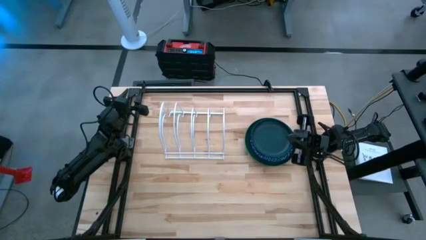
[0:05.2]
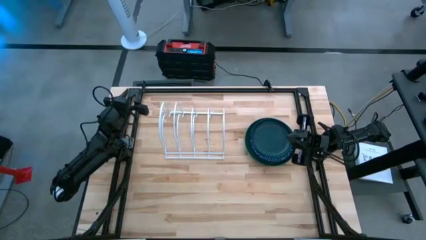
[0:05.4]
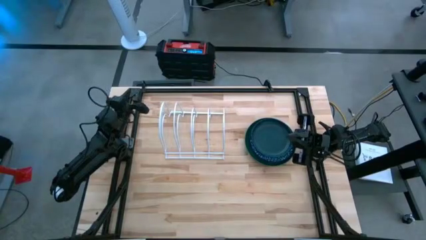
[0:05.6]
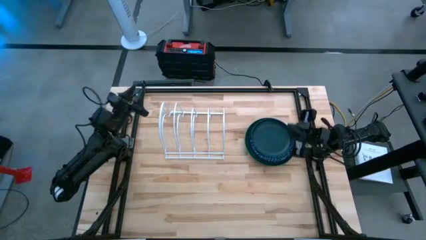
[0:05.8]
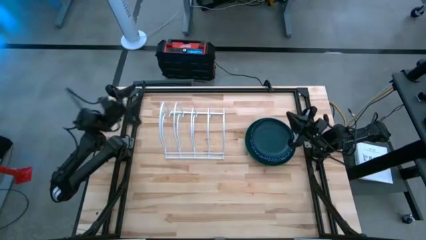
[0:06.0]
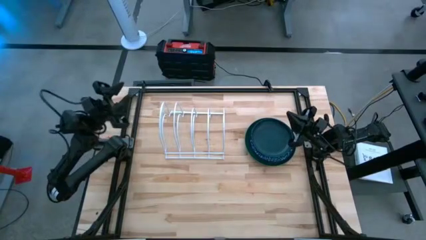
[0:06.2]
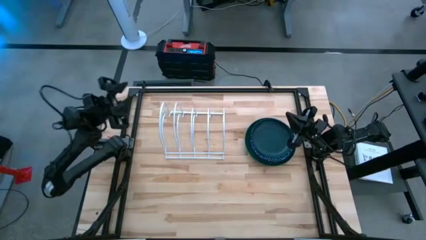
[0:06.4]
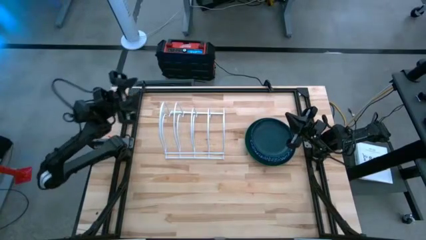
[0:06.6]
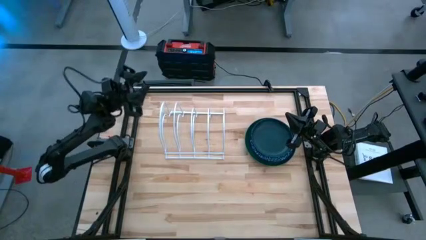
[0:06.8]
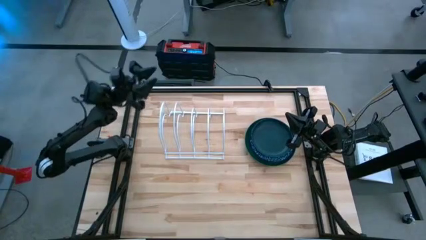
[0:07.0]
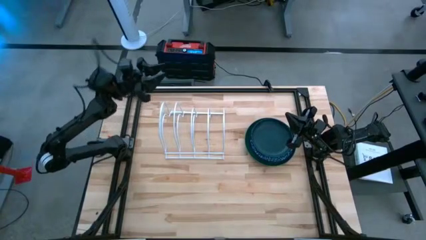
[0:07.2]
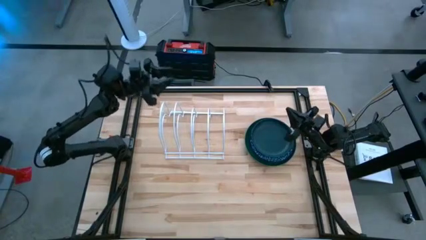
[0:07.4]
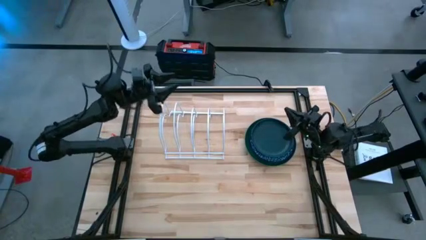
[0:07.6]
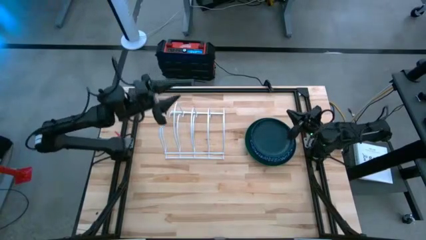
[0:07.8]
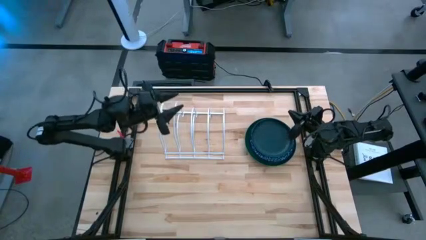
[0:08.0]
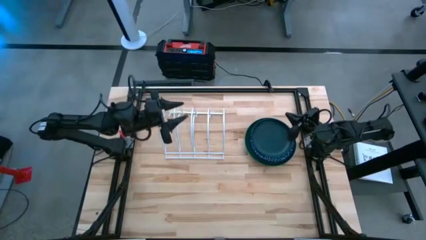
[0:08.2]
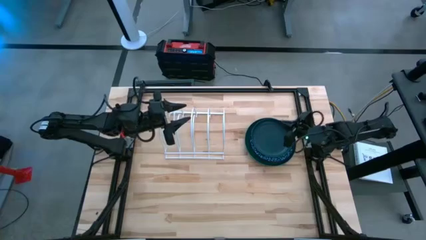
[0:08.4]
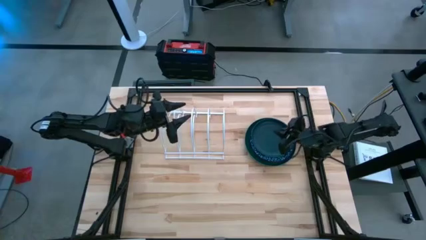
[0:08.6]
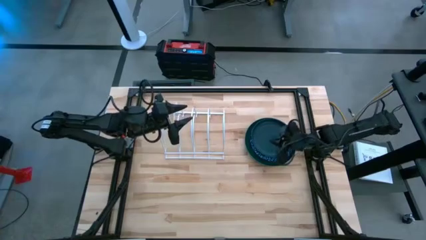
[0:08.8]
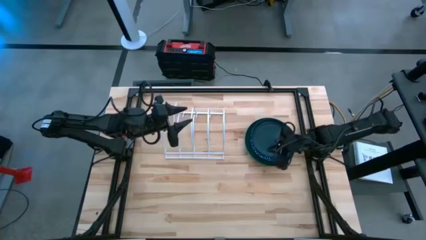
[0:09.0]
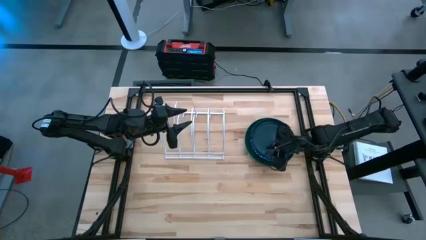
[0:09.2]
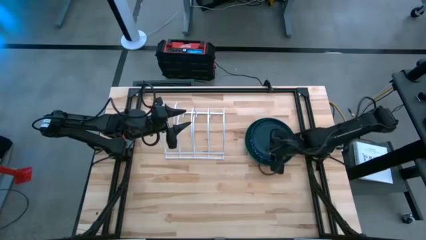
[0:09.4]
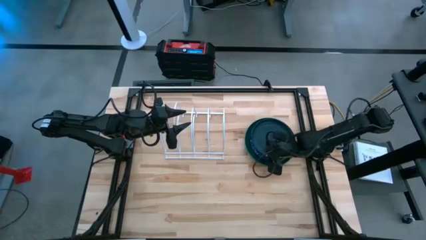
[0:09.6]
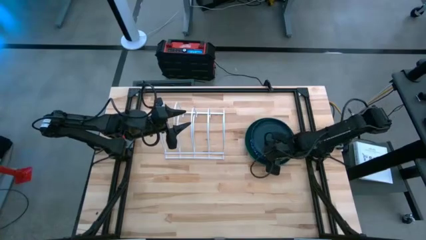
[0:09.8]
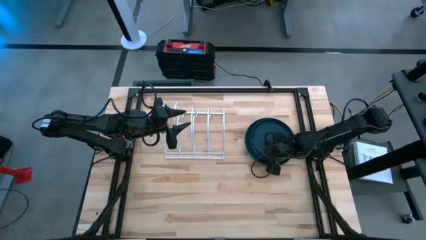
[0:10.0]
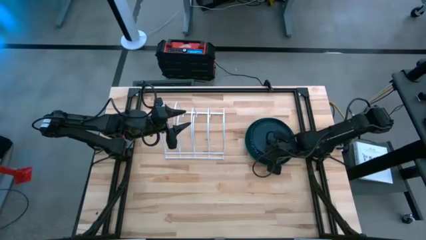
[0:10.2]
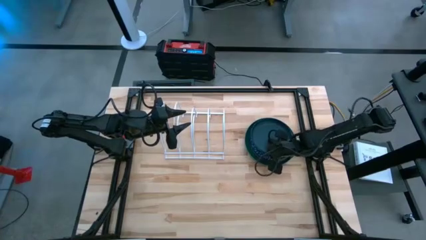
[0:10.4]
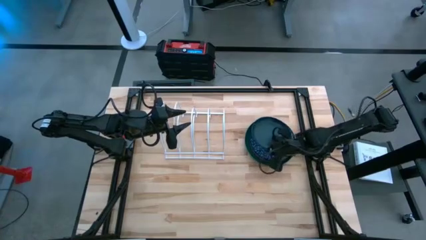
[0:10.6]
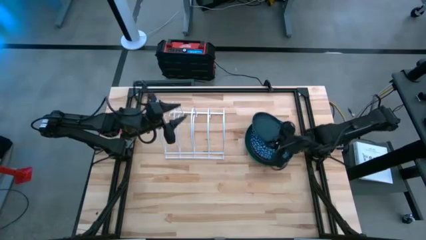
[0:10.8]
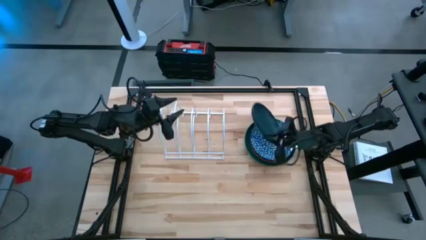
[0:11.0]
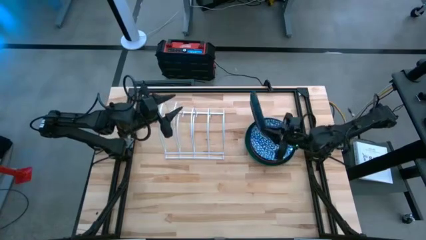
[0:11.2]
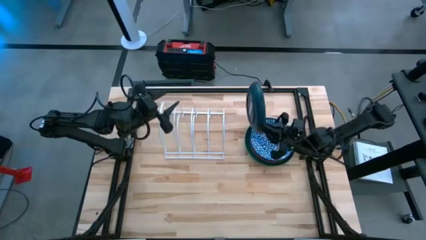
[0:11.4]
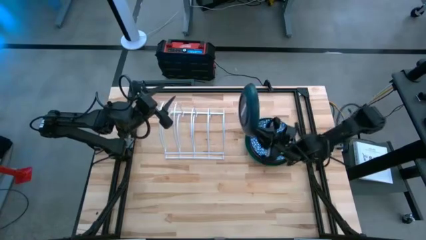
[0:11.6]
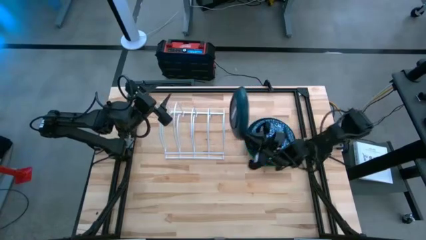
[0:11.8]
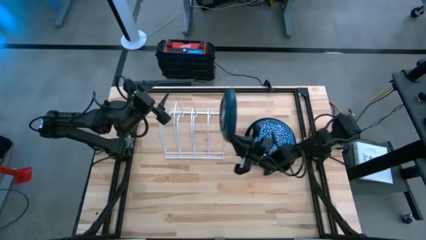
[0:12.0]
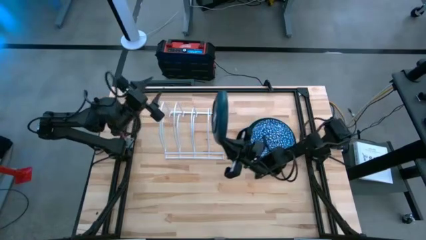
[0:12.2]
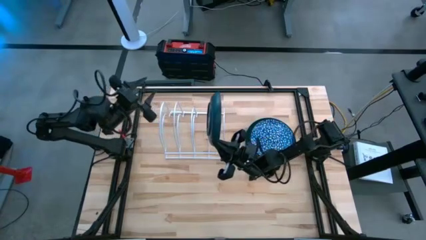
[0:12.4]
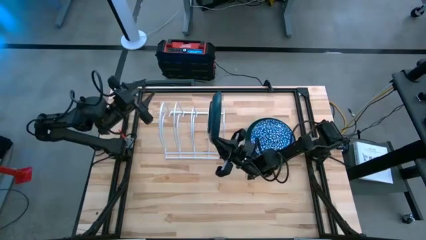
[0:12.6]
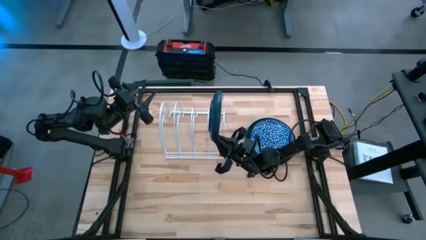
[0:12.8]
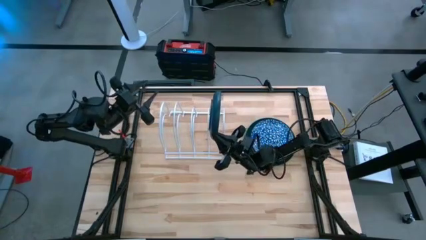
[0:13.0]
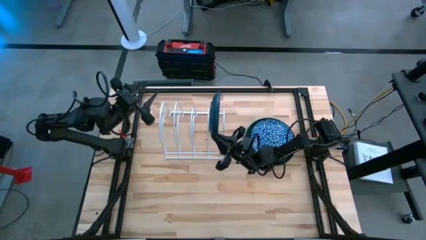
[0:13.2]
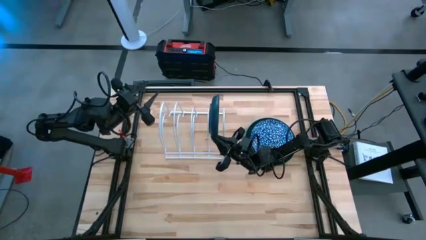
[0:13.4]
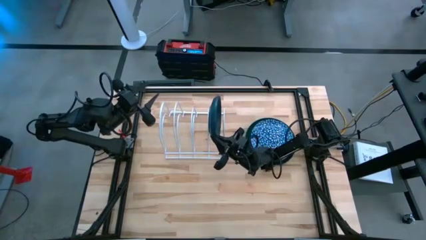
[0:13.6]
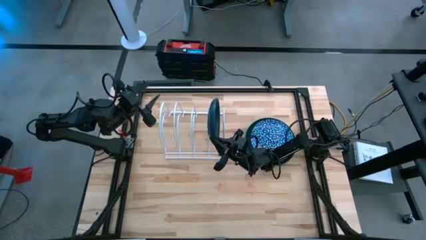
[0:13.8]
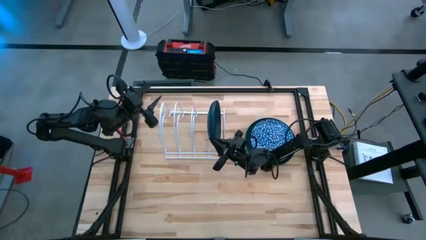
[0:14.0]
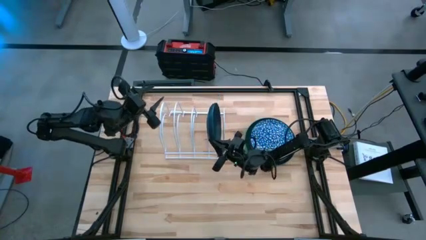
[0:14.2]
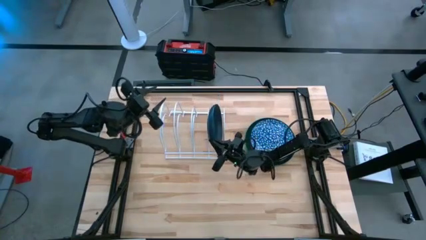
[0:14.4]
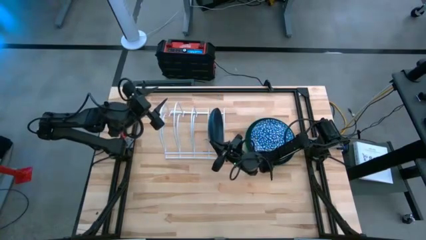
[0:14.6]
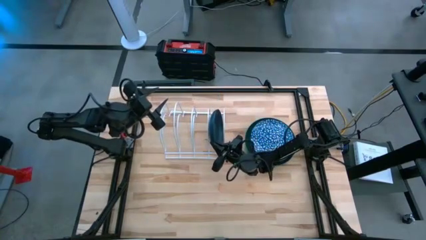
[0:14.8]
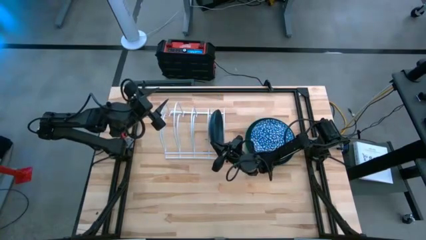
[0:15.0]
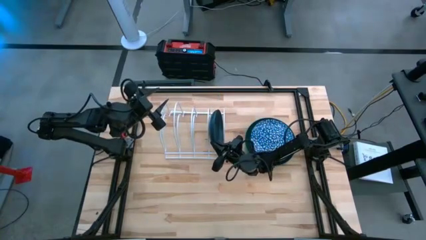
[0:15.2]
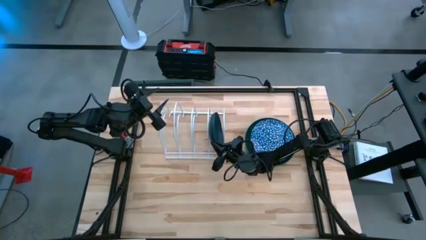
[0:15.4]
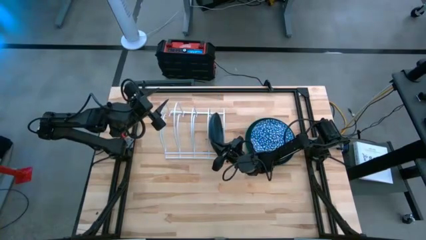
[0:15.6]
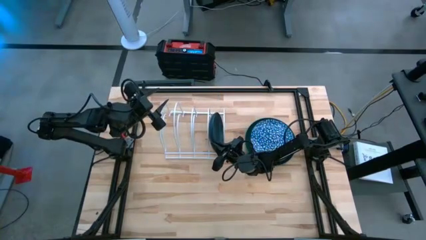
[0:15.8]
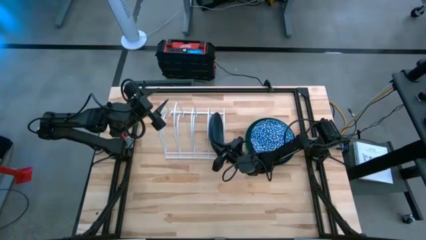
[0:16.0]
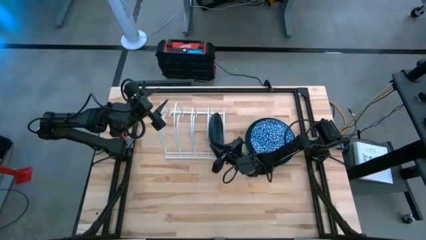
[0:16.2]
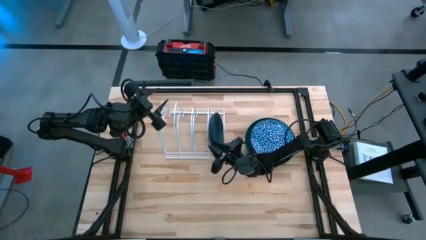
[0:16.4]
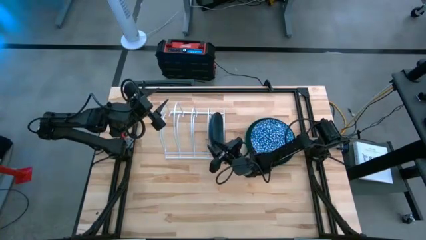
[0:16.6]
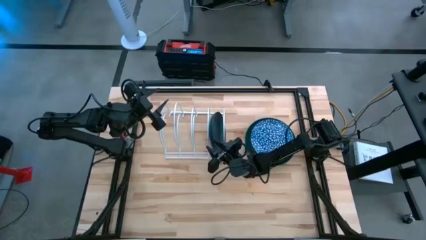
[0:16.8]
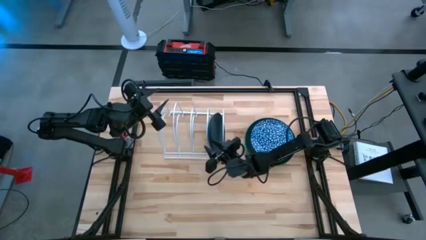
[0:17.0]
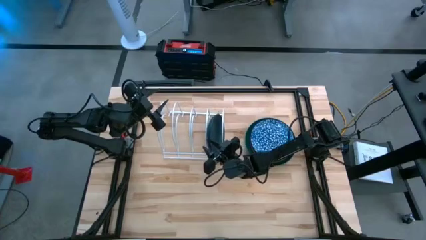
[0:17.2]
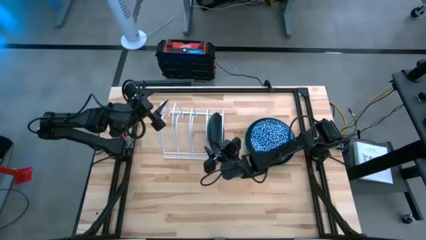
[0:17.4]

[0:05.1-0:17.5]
Task: Sort dishes
Put the dark blue plate into the dish rack
